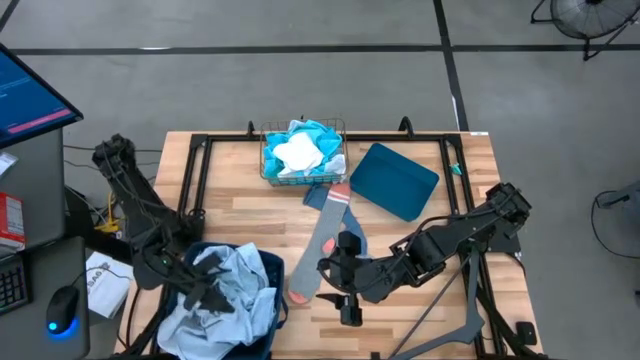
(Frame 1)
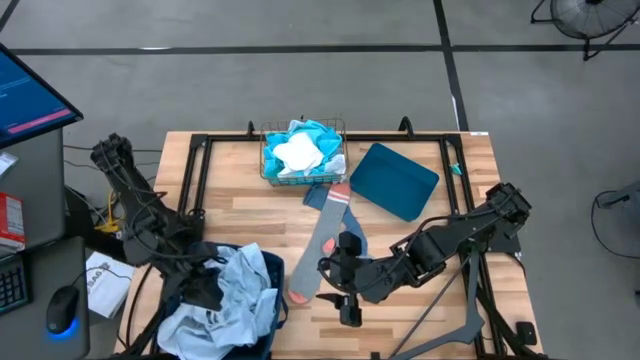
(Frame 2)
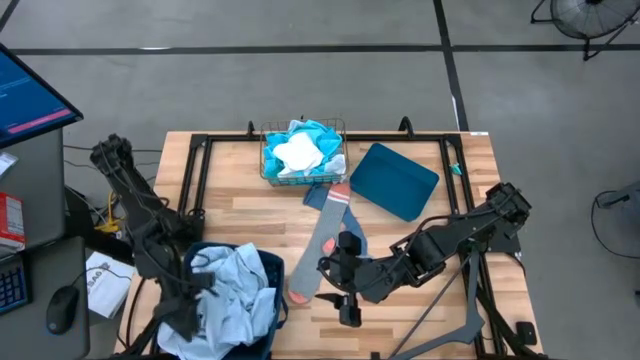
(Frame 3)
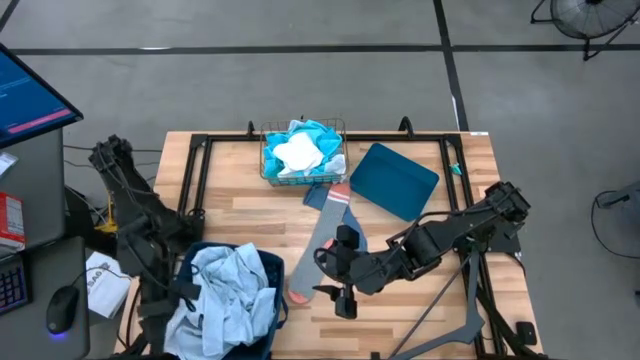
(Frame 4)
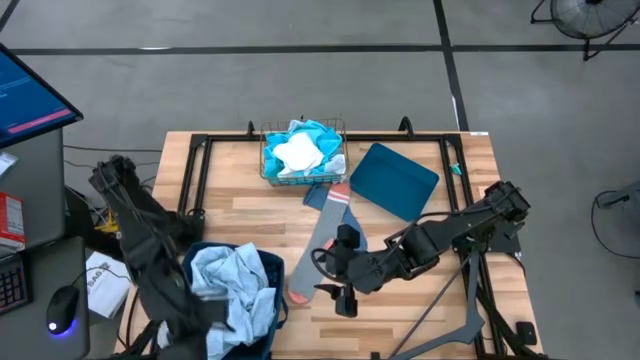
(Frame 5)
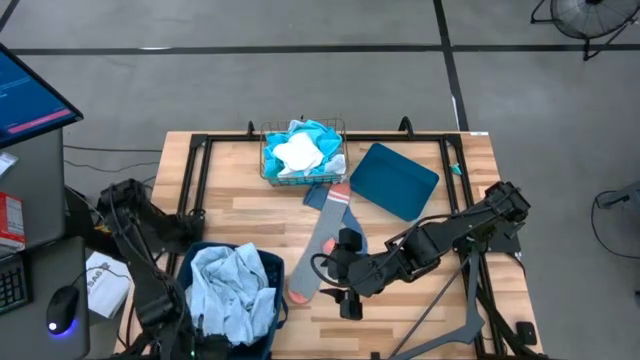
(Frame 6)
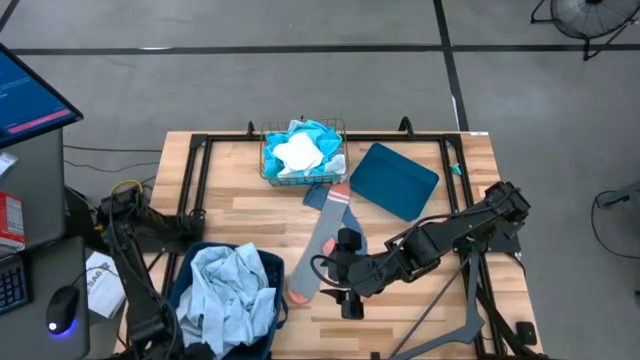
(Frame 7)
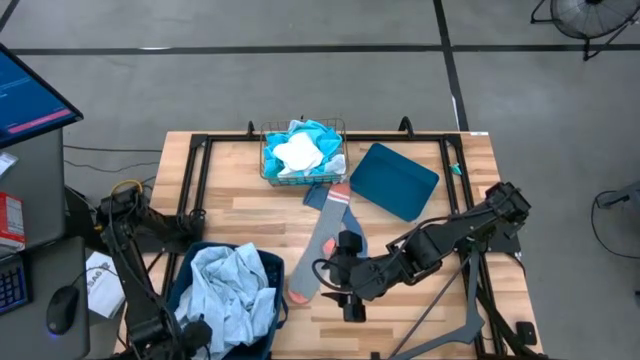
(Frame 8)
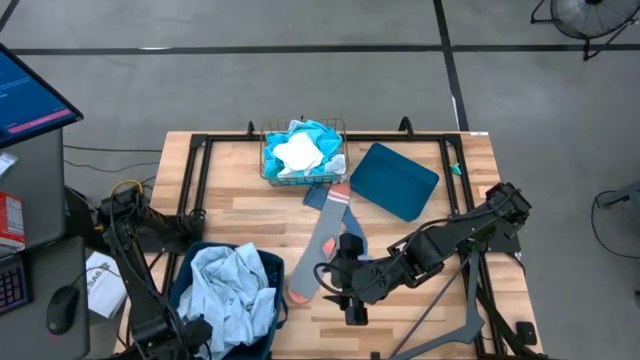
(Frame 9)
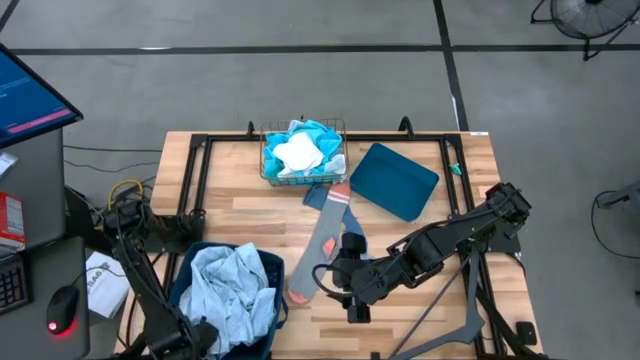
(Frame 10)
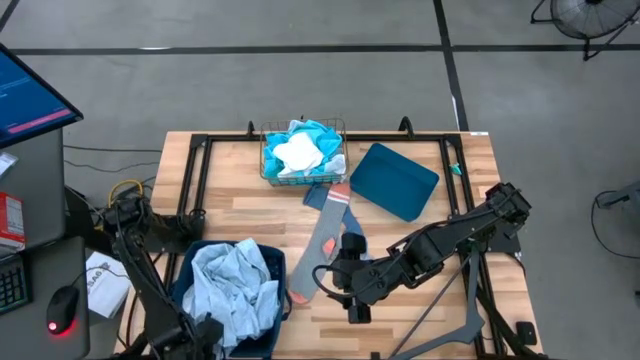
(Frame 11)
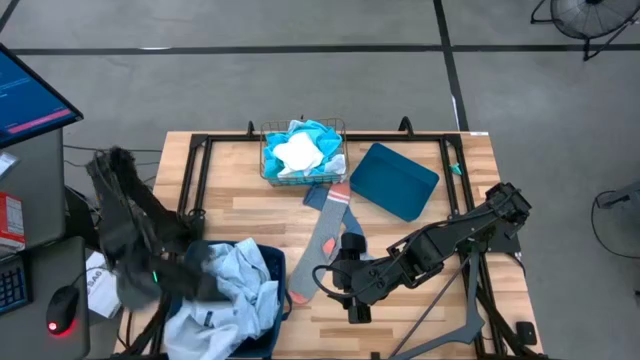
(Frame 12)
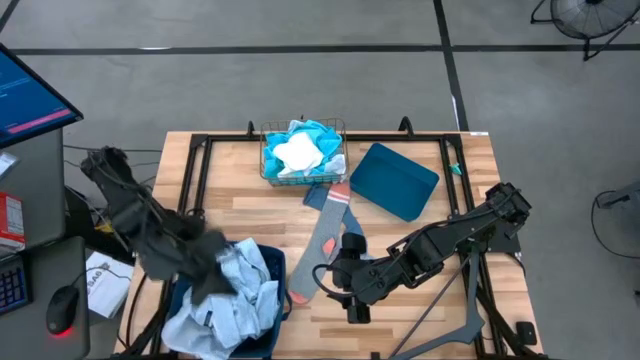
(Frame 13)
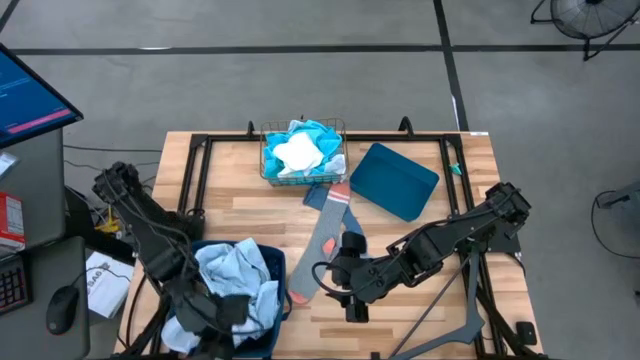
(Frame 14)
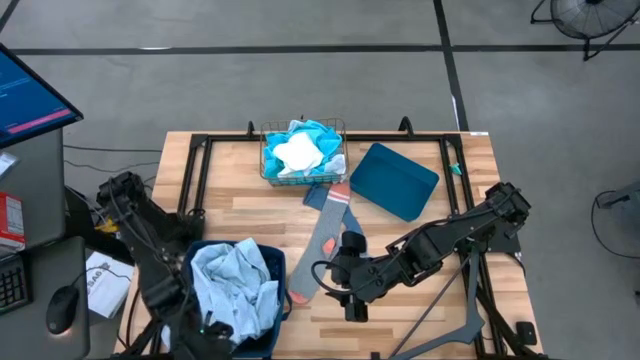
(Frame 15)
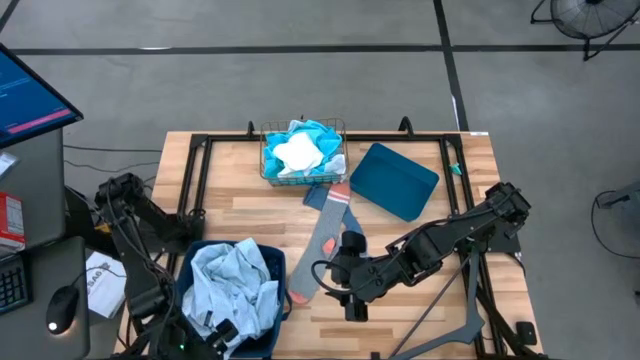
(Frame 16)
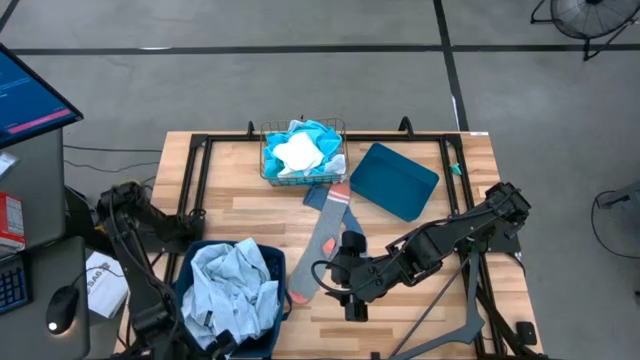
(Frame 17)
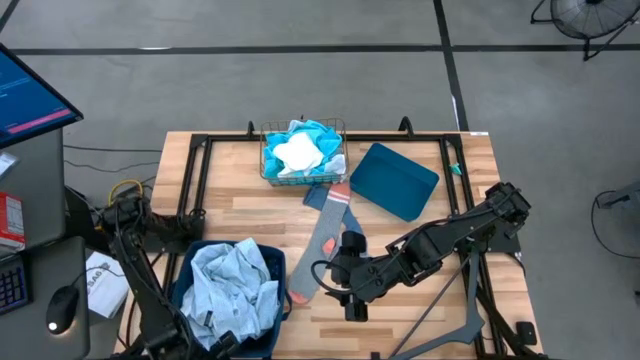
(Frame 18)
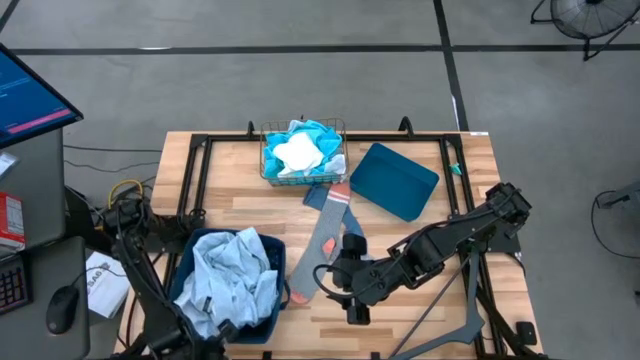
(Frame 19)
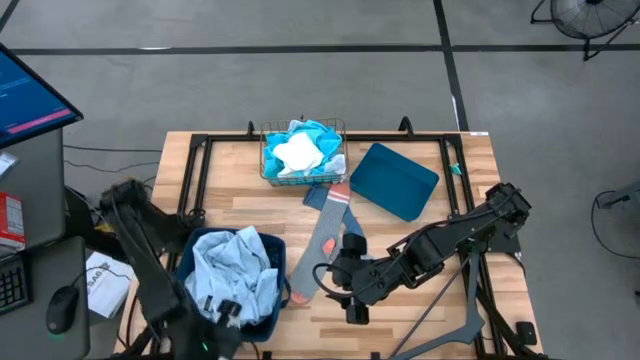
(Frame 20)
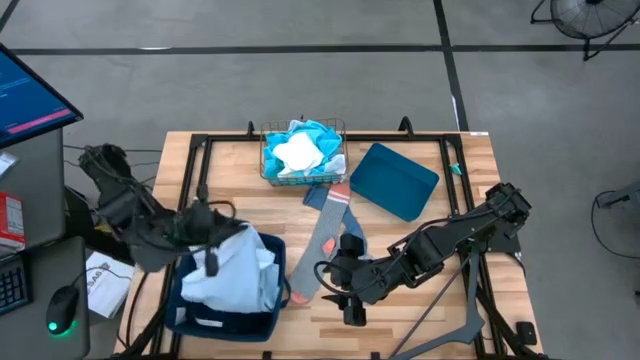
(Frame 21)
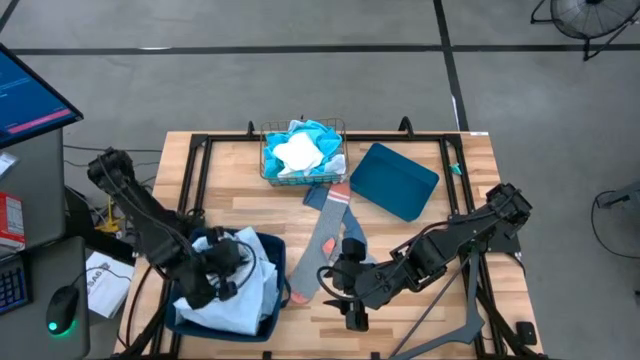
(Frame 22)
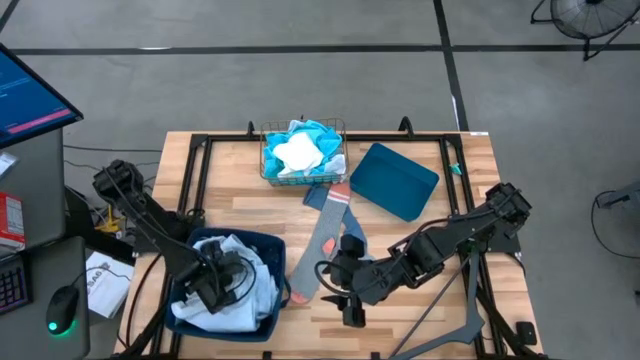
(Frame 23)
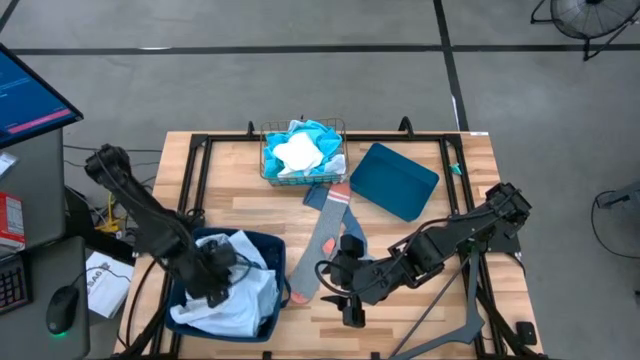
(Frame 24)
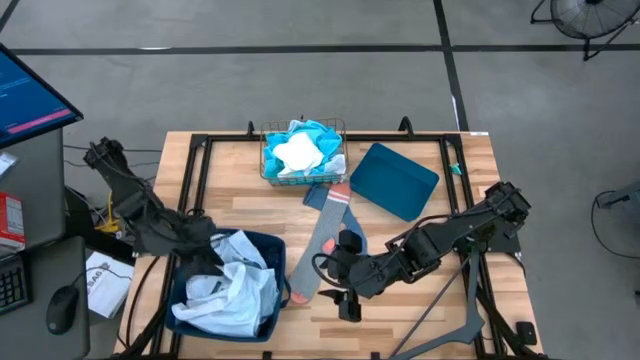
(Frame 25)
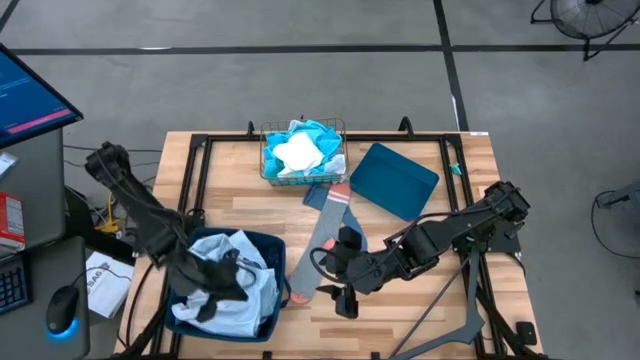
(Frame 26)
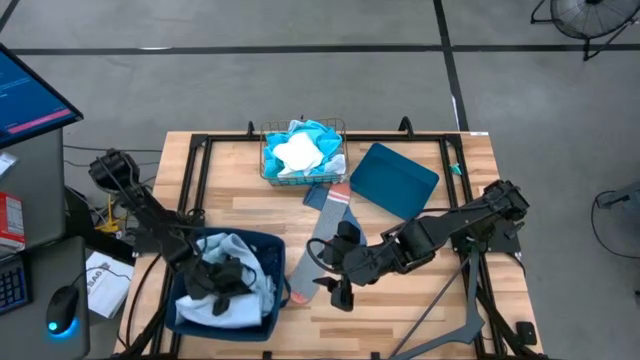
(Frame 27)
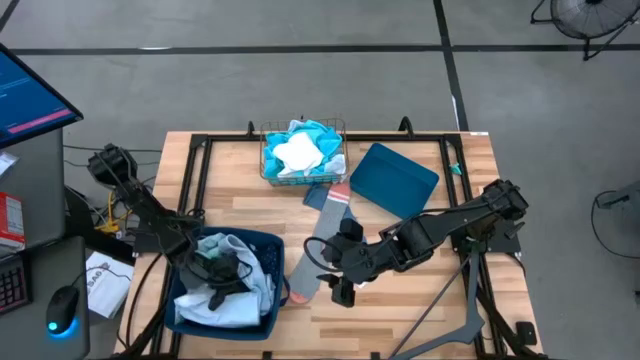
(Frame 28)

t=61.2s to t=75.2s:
Task: Pick & Place Cloths
Put the light blue polo shirt into the blue bin

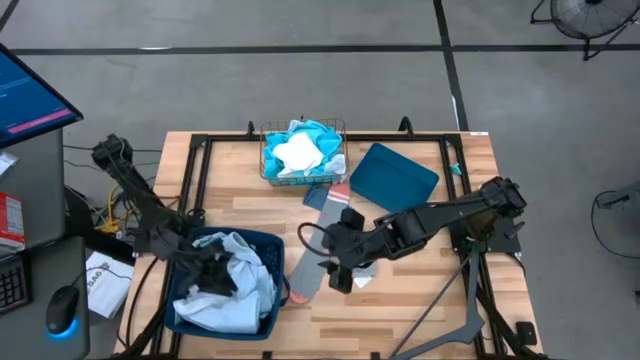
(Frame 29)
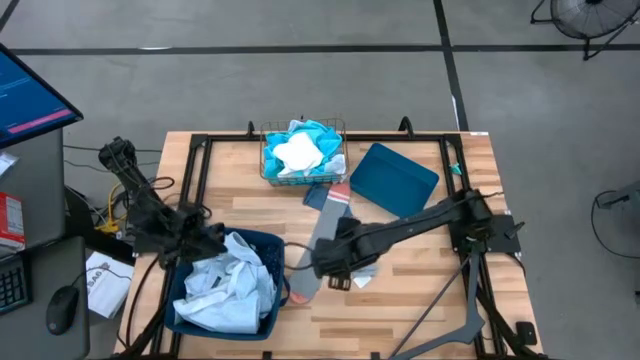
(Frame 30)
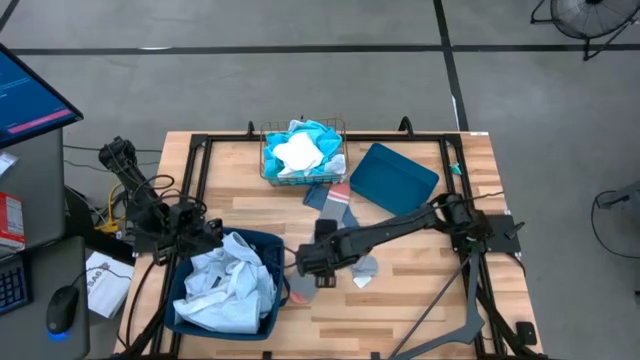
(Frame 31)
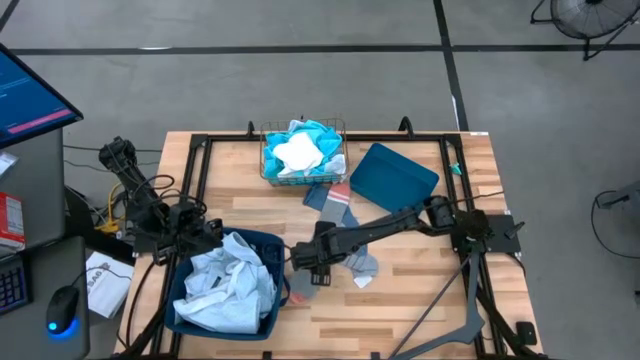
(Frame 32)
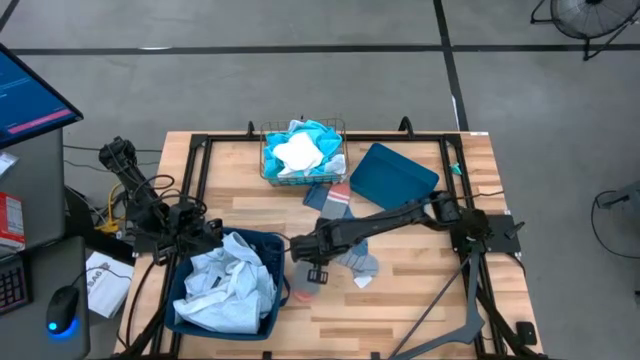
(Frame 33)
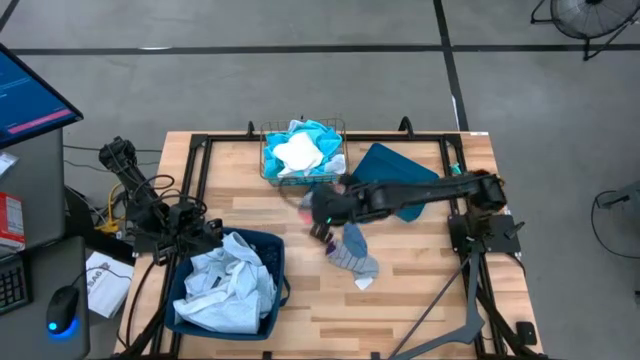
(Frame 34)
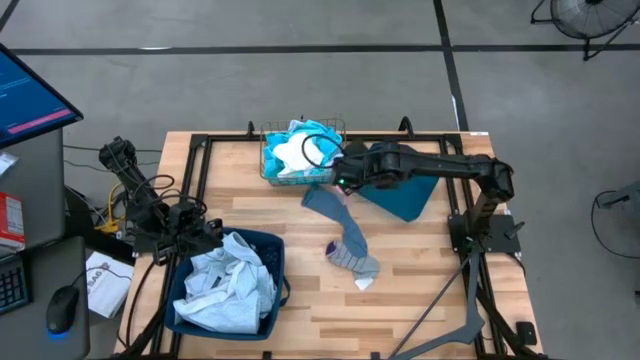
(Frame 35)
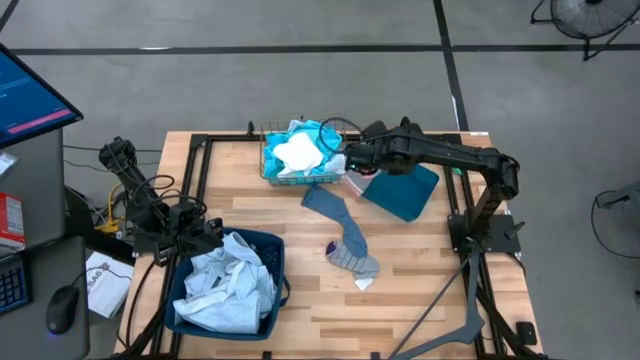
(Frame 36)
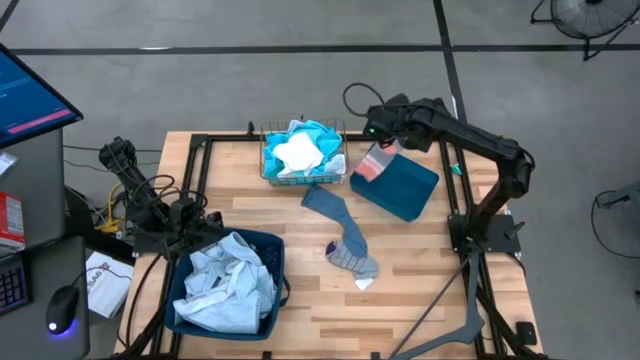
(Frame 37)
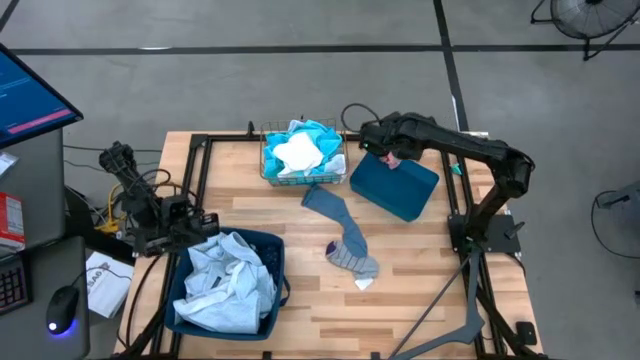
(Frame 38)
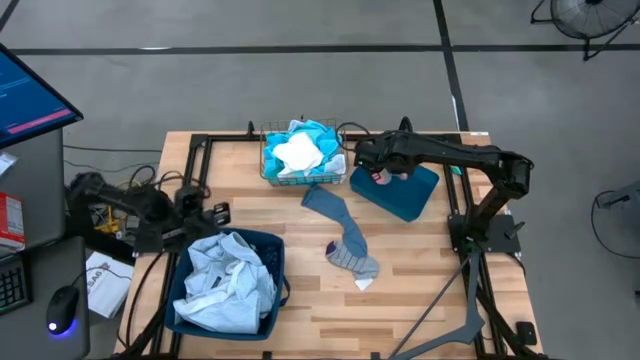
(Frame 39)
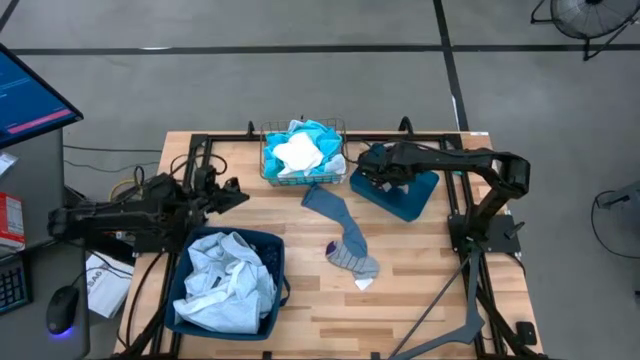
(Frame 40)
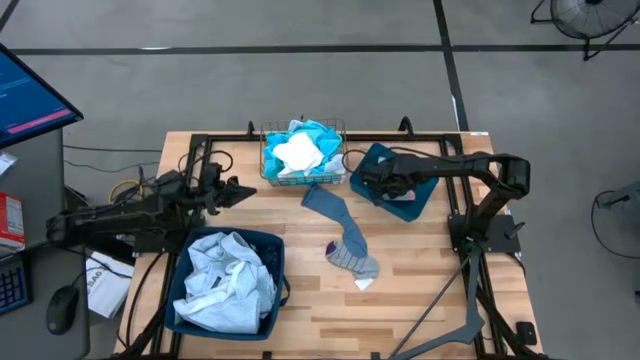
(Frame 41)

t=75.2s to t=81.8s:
Put the gray sock into the blue bin

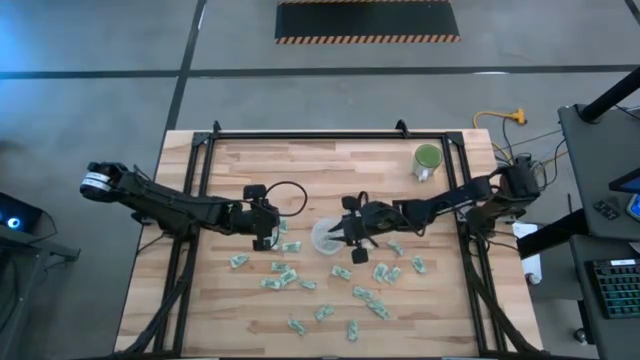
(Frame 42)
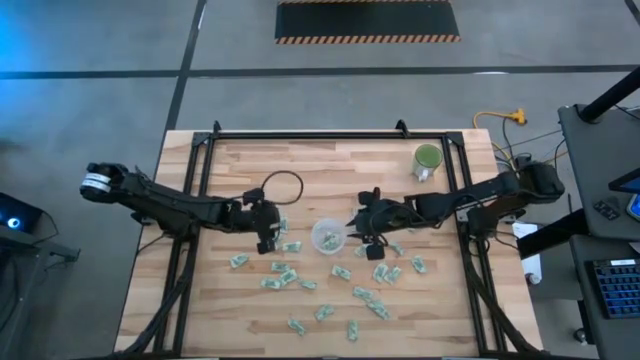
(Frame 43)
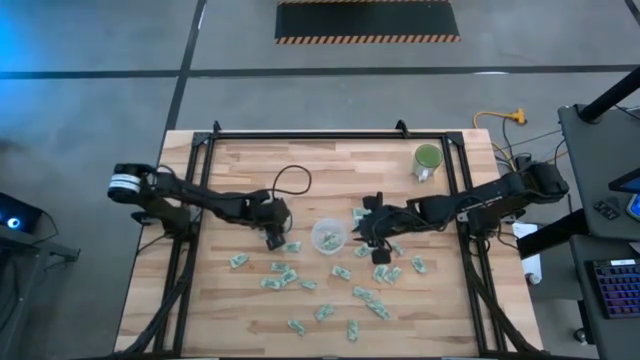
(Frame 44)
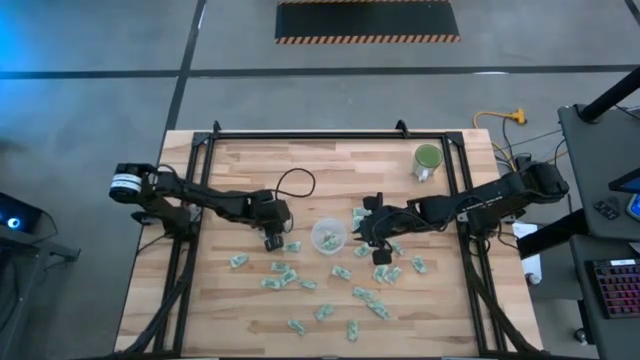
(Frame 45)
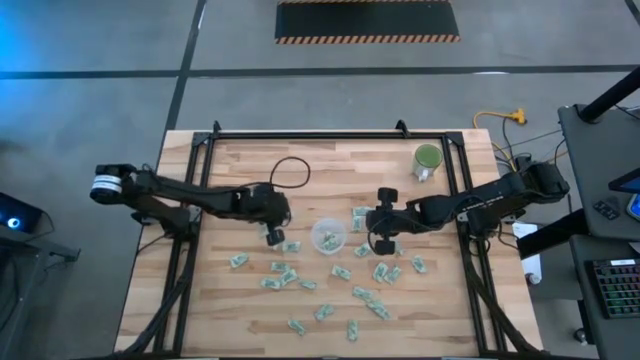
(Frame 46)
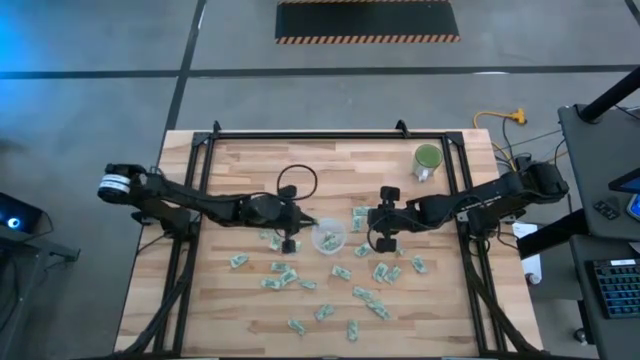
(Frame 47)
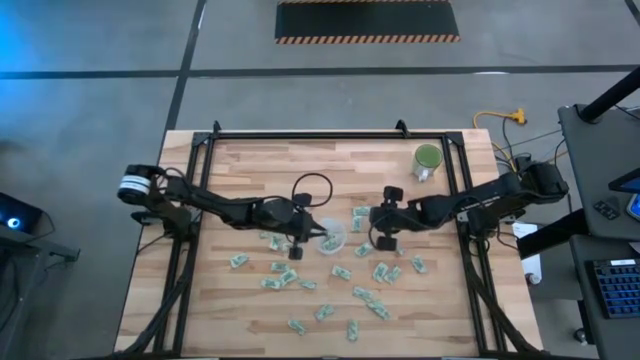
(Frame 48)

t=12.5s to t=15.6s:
Task: Pick and place Stevia / Truvia into bins
Put the light green stevia packet into the transparent container
